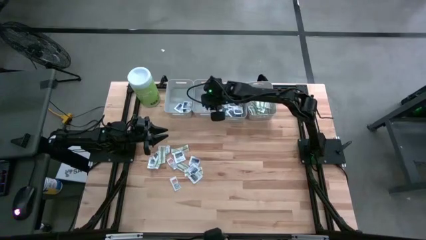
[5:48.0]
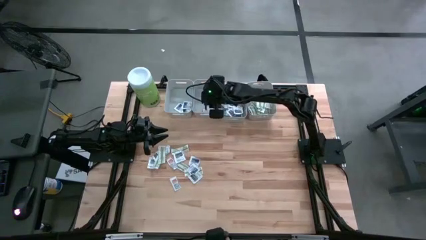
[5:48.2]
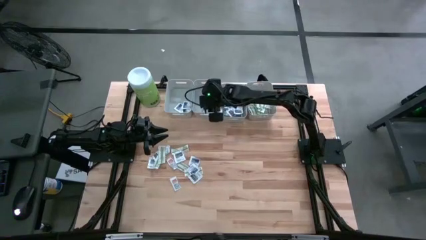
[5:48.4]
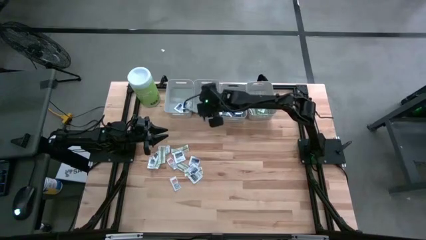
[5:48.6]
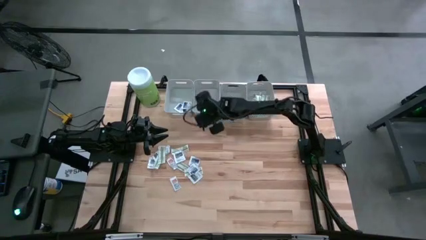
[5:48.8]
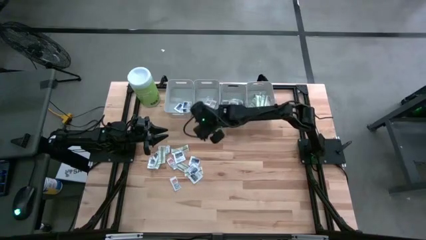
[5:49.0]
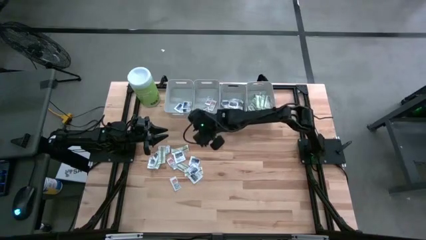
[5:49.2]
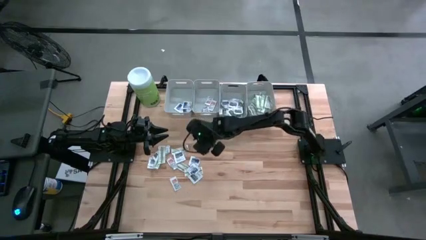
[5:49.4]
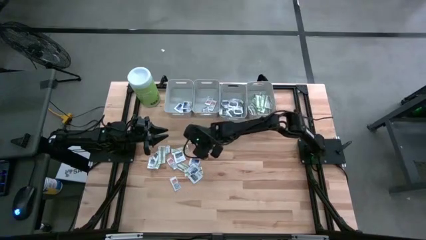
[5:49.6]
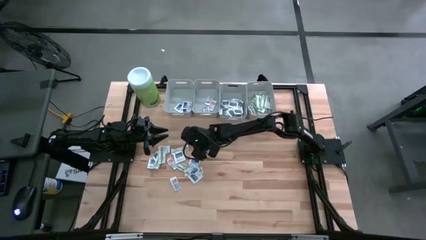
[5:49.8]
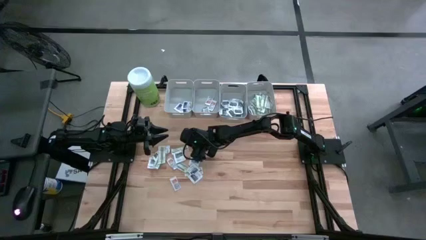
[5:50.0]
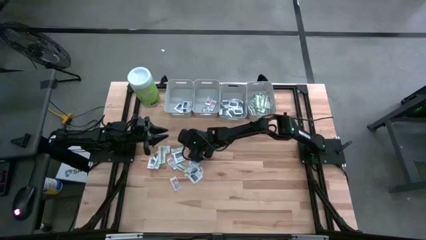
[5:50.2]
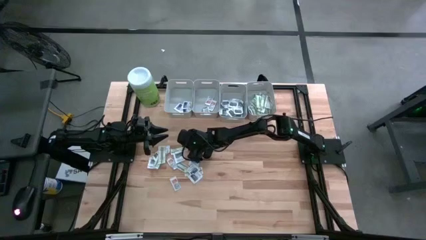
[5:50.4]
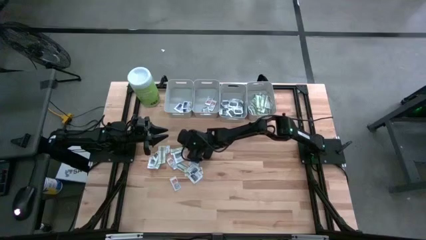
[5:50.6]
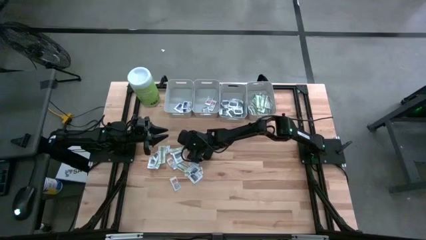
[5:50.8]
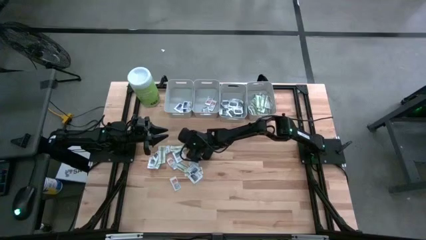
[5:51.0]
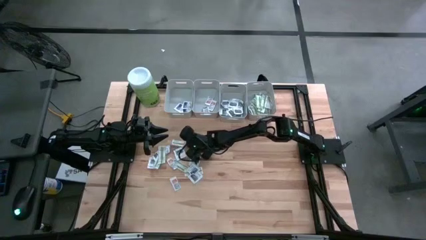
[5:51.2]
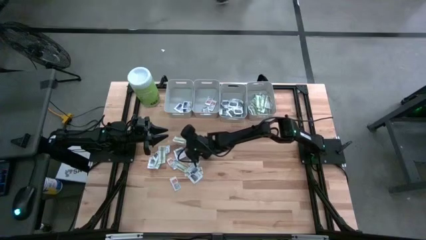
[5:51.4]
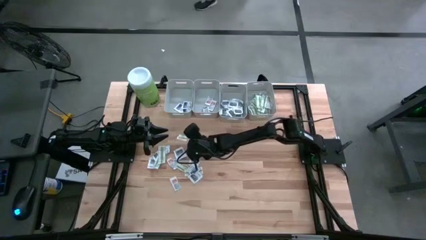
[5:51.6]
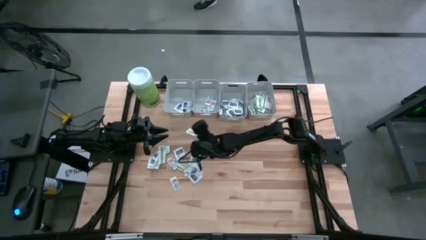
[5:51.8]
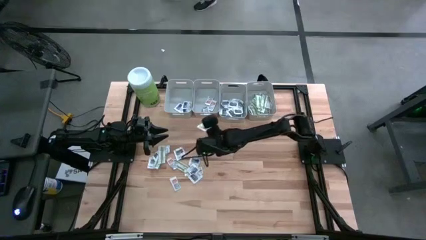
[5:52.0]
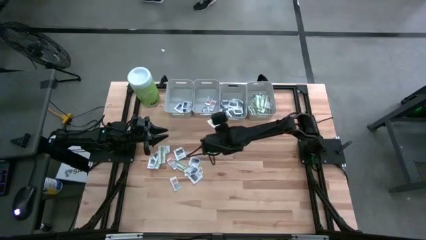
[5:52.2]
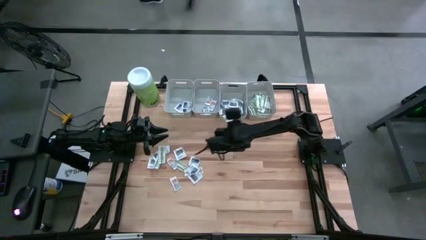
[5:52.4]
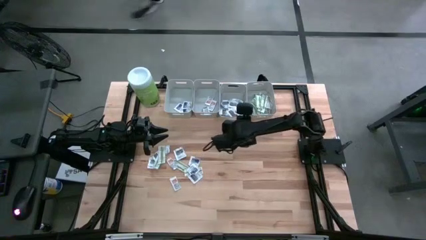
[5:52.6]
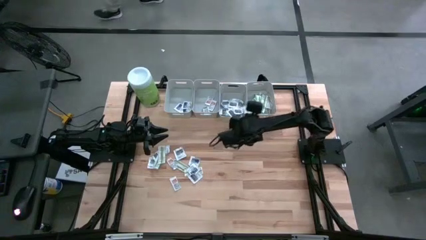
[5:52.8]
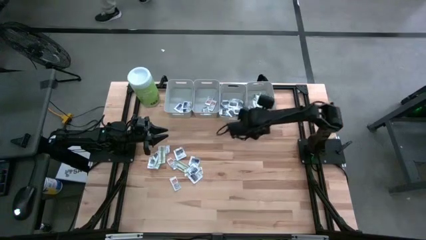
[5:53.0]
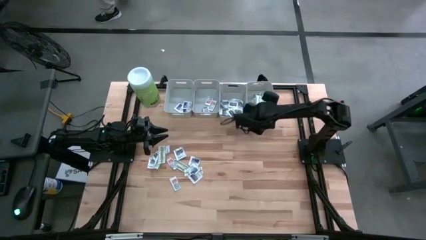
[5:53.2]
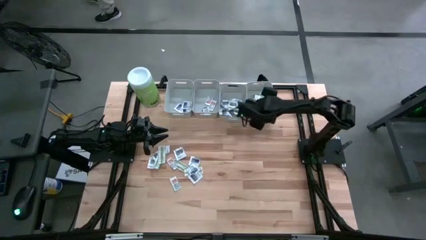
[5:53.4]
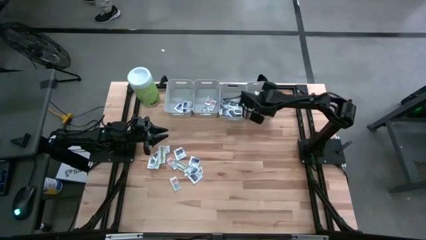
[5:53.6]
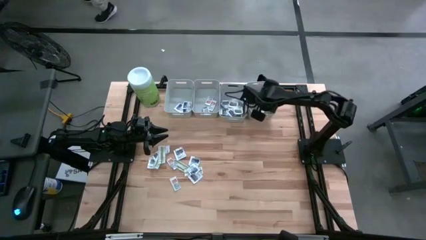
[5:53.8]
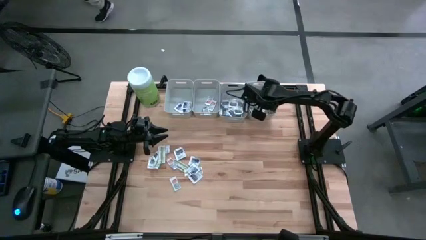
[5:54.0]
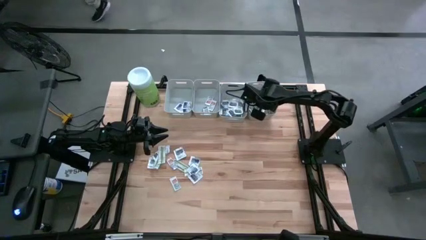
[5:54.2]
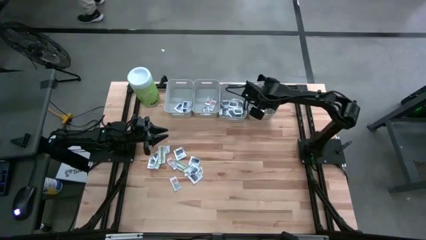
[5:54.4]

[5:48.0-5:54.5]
Task: Pick & Place First Aid Supplies
Put the bandage into the right gray bin

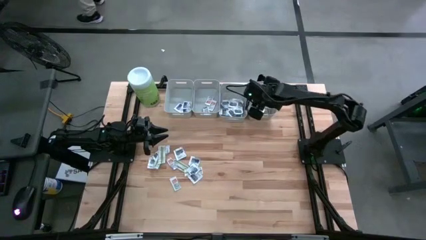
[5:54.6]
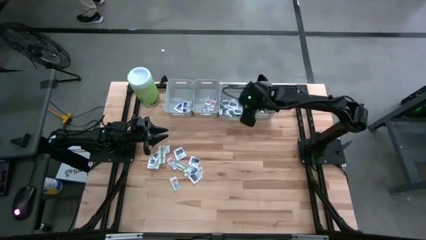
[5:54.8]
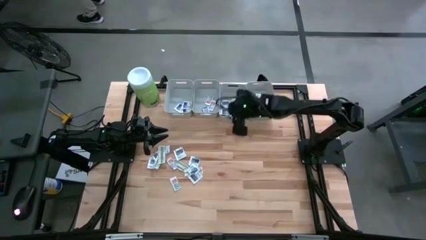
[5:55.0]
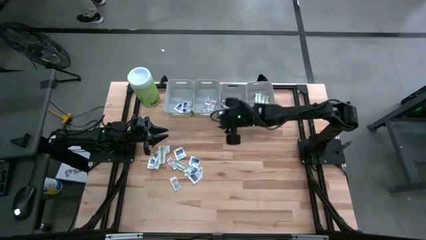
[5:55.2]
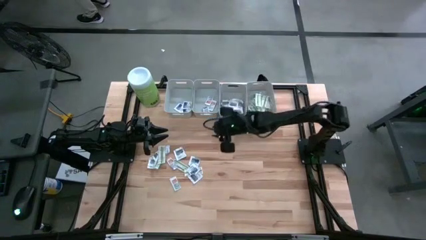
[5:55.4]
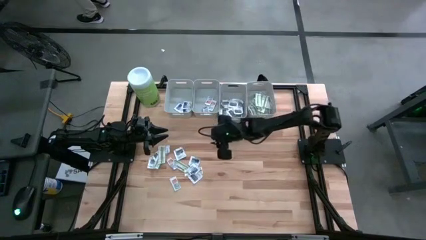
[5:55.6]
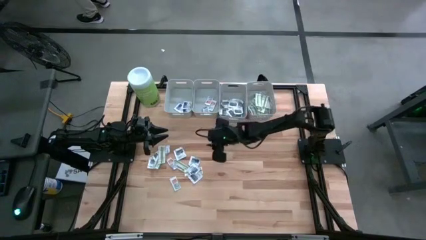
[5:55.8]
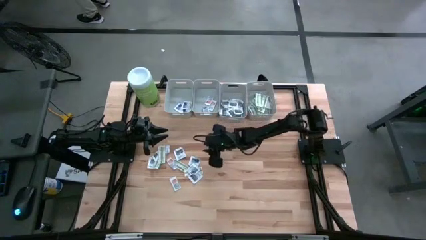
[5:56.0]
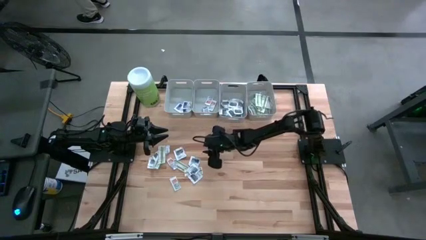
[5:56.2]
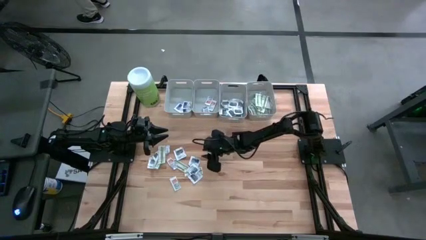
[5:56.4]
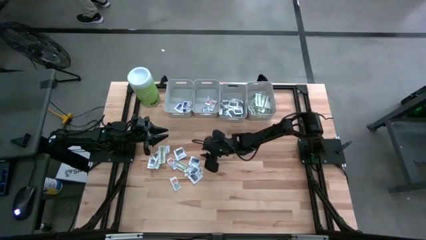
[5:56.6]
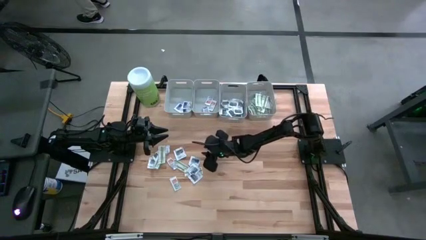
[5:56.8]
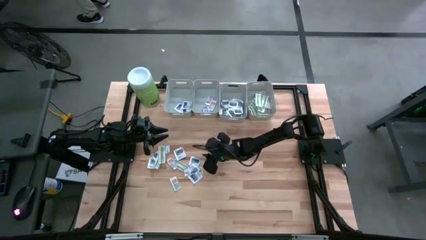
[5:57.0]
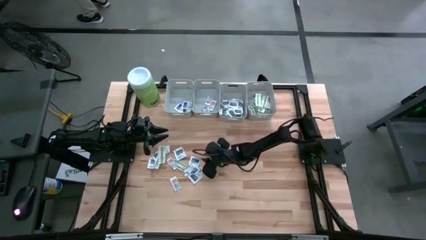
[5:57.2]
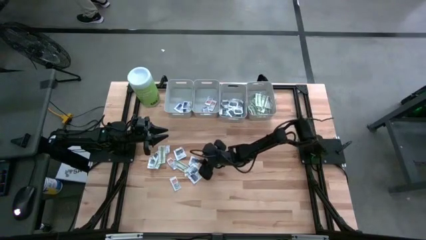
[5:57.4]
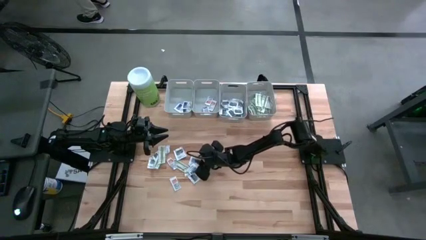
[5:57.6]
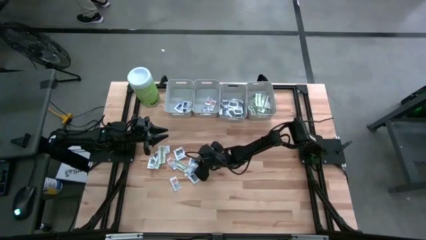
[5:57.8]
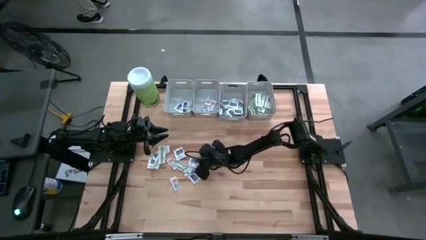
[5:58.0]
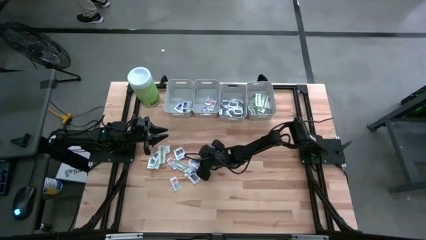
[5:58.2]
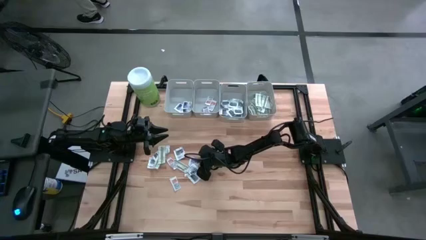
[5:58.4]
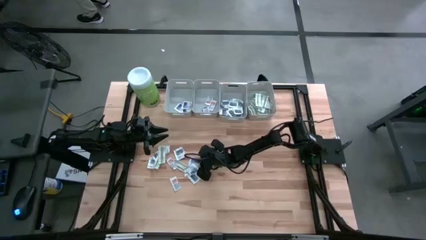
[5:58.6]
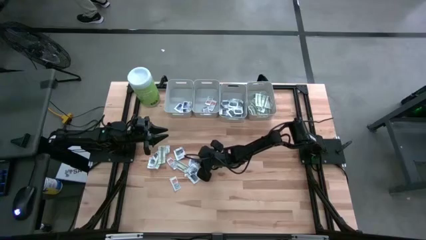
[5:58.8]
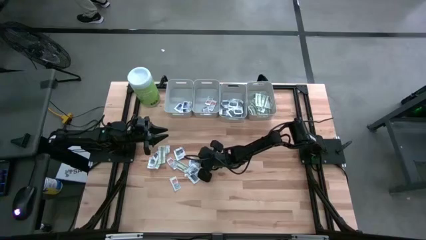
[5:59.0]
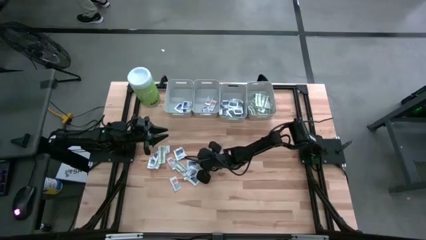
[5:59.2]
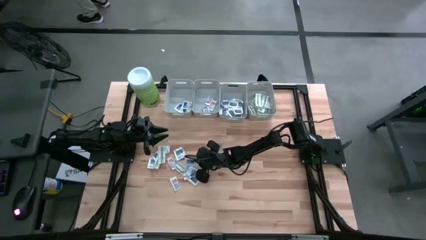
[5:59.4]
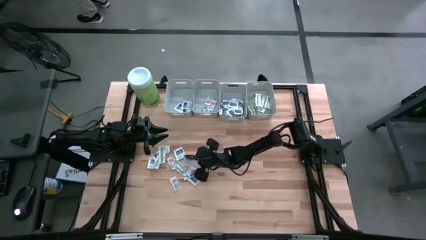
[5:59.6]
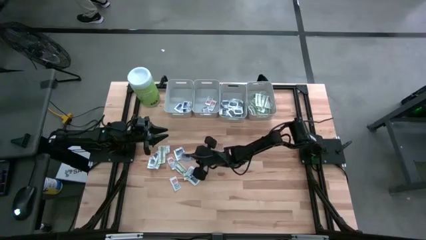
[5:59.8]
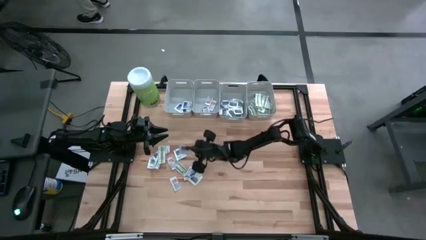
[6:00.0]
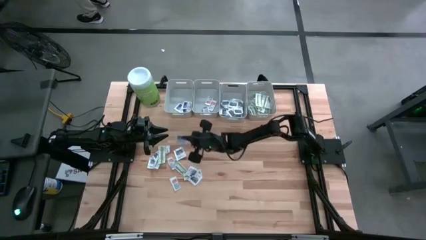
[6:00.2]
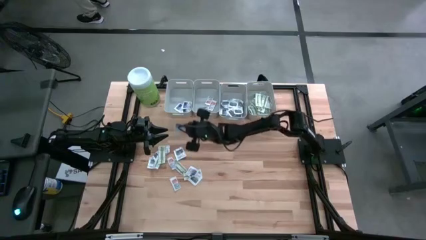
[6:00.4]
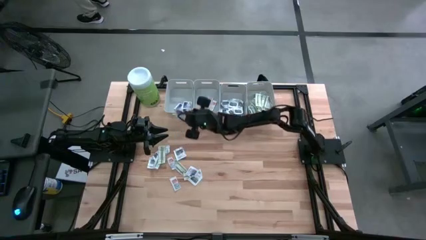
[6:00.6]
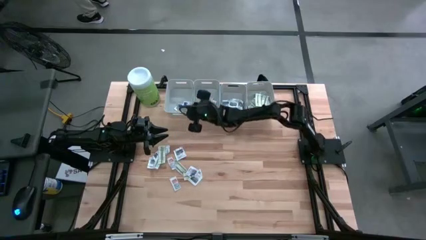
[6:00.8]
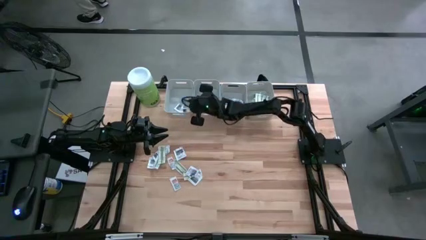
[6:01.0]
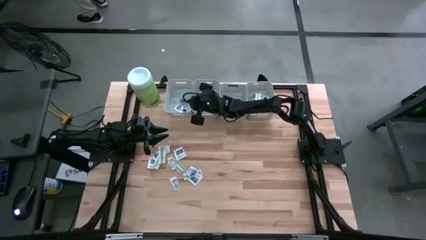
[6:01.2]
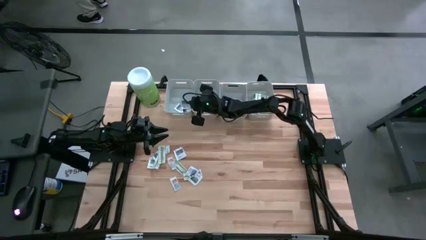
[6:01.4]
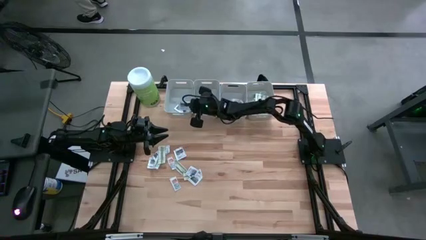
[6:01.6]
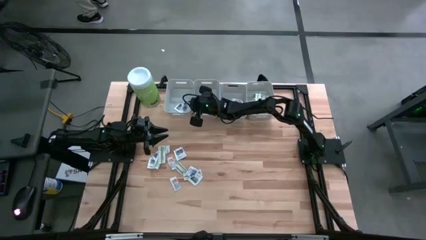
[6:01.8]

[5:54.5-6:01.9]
Put the alcohol pad into the left gray bin

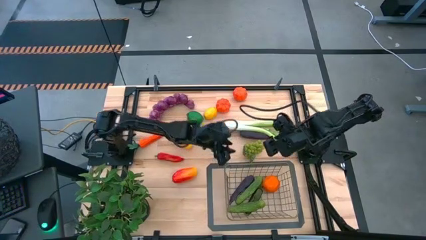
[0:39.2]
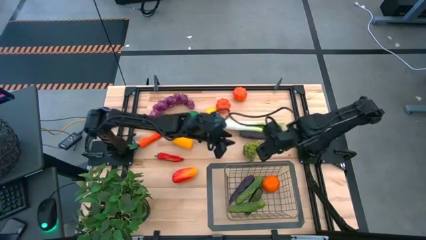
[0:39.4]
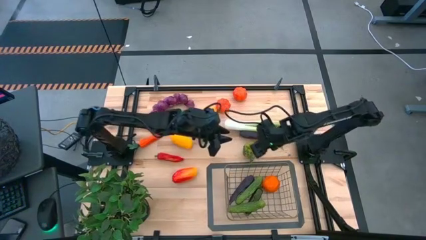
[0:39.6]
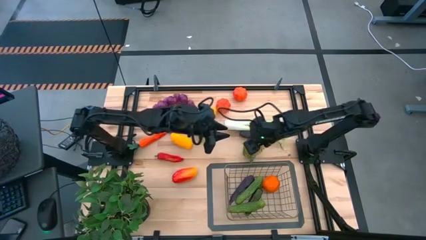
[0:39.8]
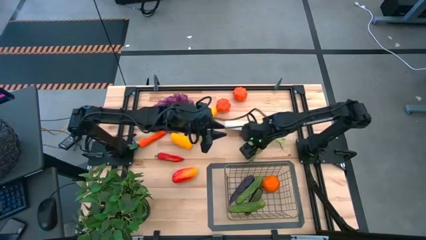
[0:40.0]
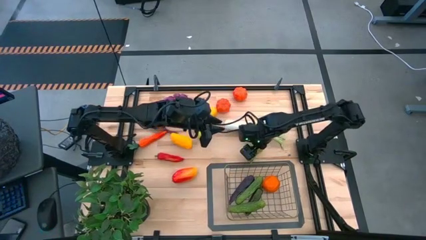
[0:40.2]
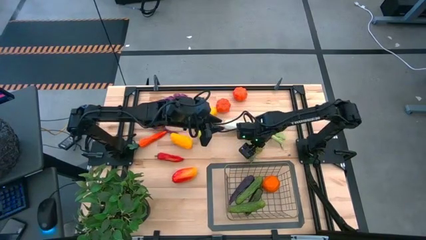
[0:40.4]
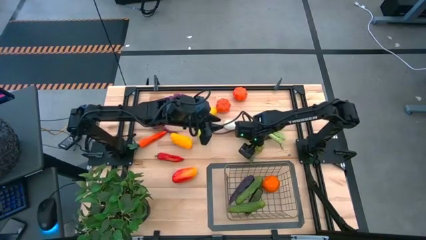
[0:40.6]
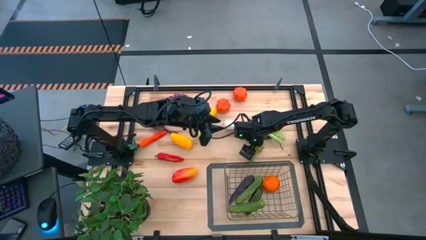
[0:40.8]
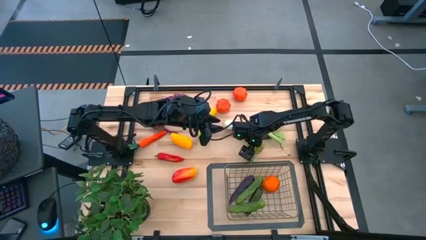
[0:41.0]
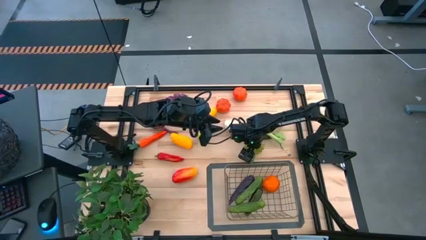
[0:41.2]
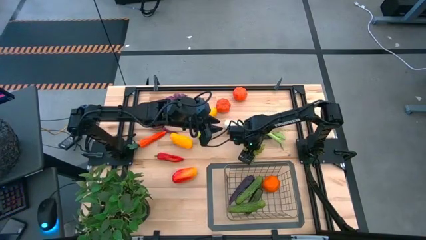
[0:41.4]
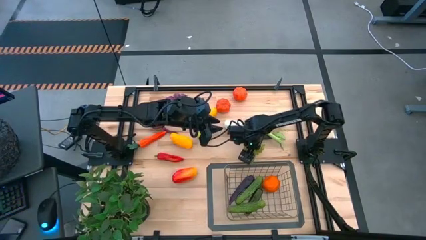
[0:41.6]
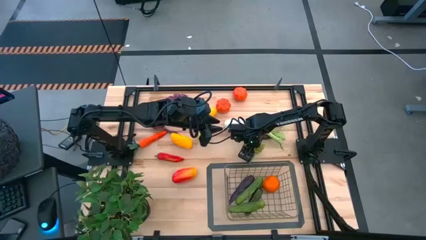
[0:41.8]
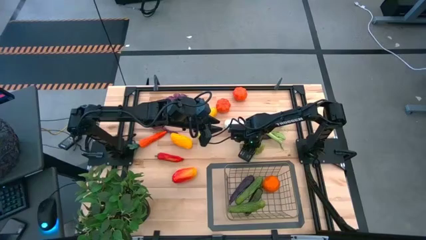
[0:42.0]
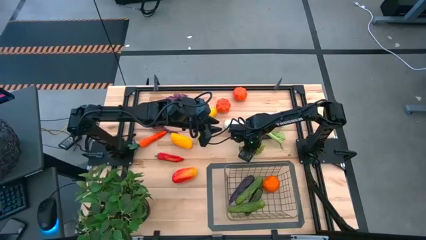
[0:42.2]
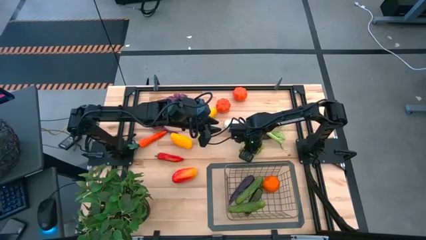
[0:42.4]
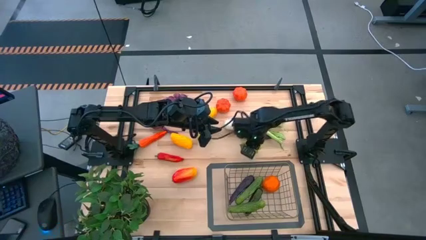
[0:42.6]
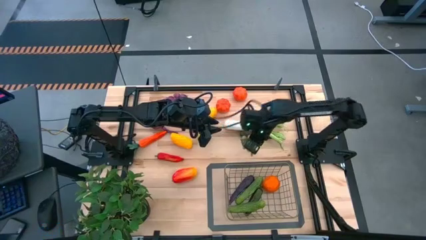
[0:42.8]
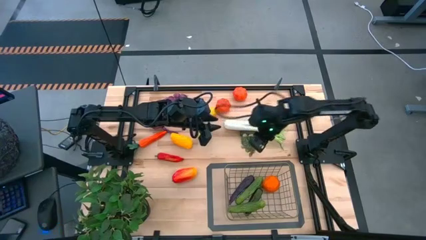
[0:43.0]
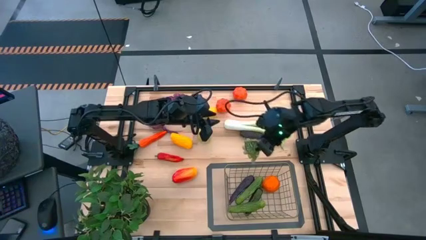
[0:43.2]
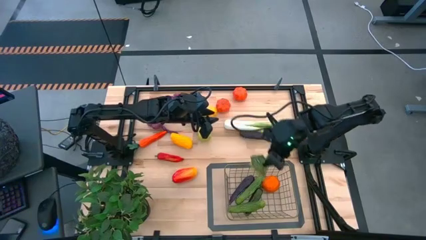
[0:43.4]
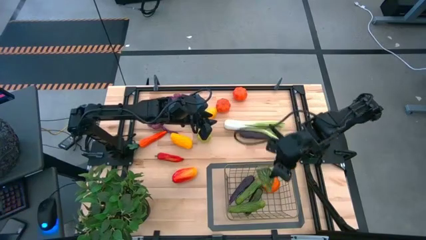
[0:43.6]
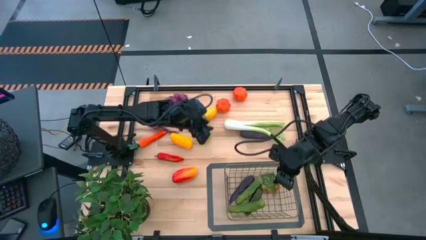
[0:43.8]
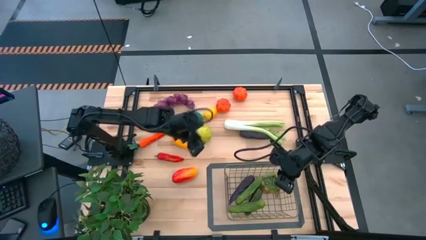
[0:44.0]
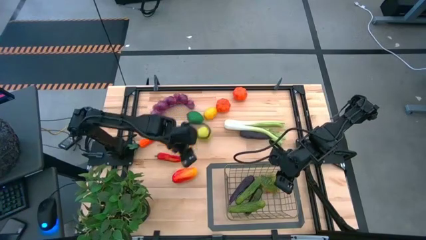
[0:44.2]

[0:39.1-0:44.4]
Task: Build produce basket
Put the grapes into the wire basket
